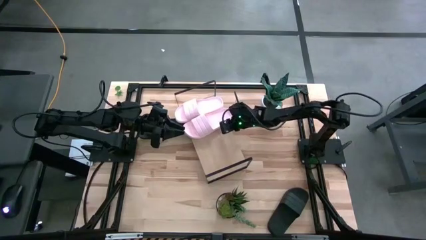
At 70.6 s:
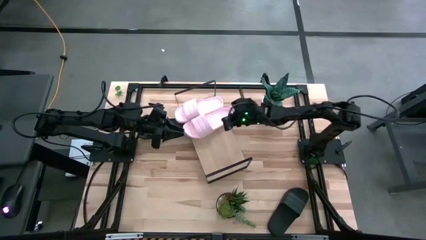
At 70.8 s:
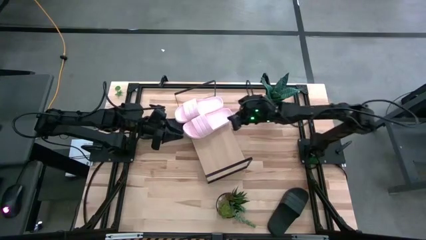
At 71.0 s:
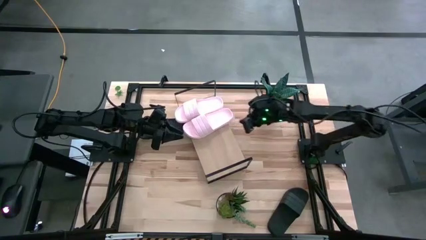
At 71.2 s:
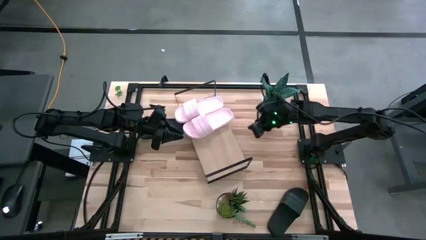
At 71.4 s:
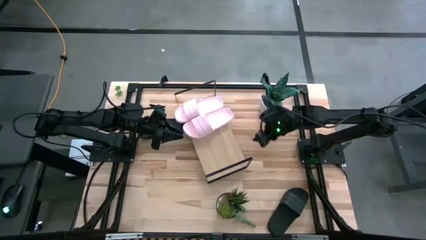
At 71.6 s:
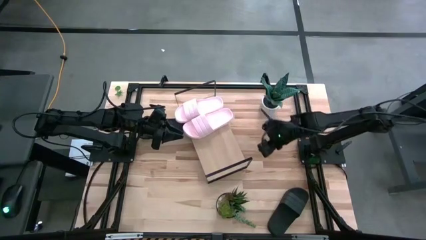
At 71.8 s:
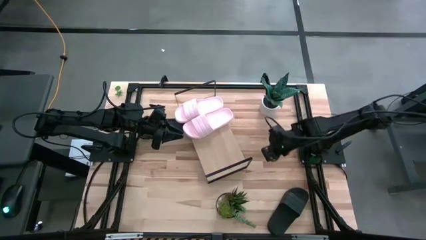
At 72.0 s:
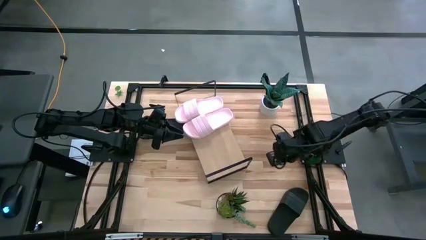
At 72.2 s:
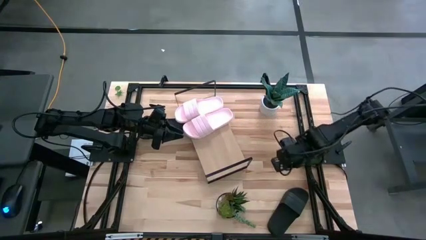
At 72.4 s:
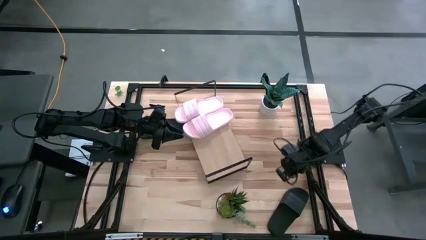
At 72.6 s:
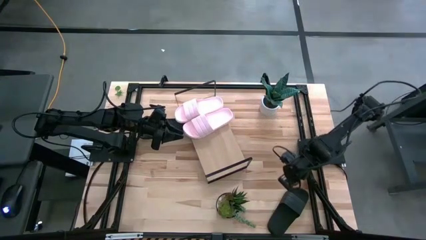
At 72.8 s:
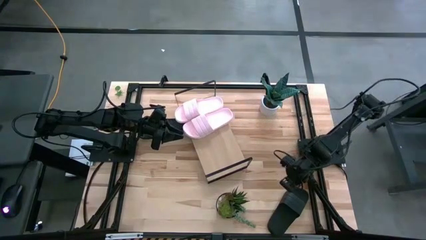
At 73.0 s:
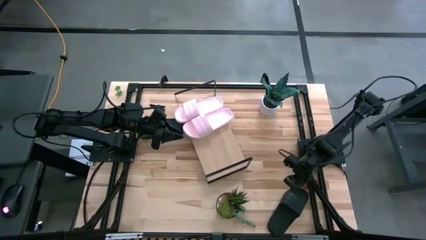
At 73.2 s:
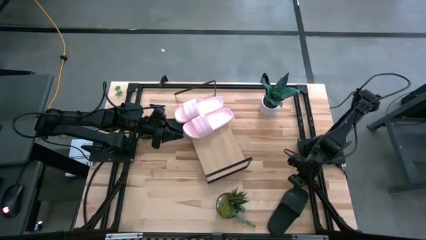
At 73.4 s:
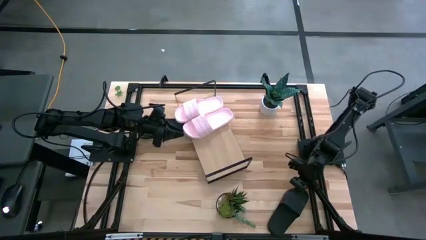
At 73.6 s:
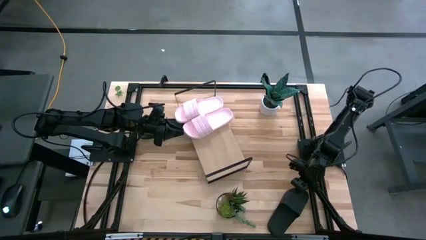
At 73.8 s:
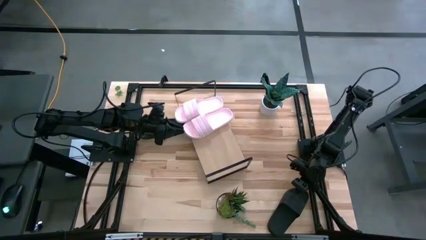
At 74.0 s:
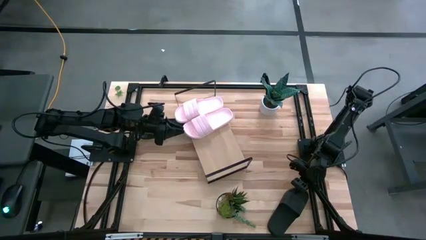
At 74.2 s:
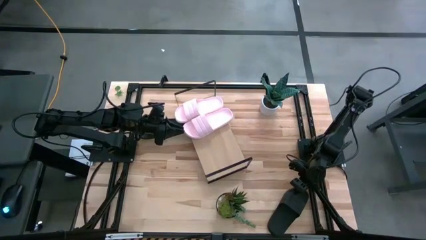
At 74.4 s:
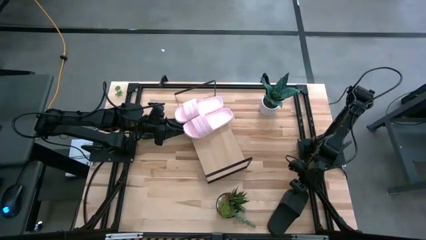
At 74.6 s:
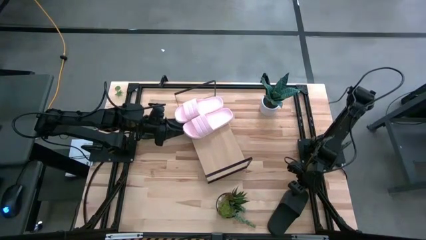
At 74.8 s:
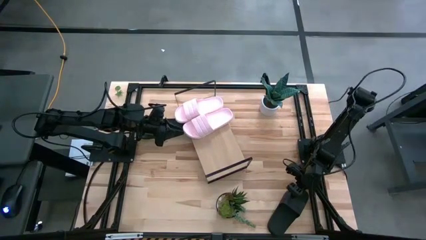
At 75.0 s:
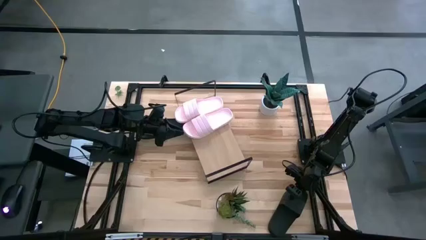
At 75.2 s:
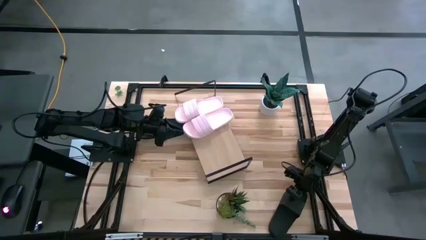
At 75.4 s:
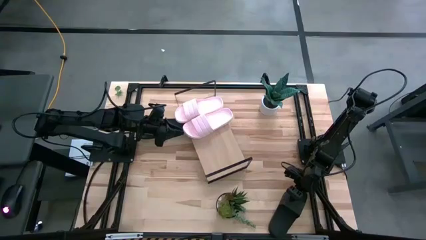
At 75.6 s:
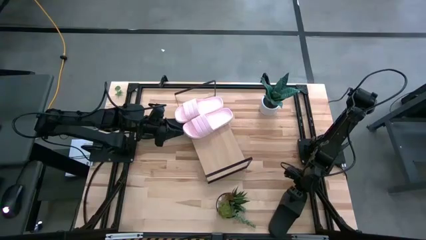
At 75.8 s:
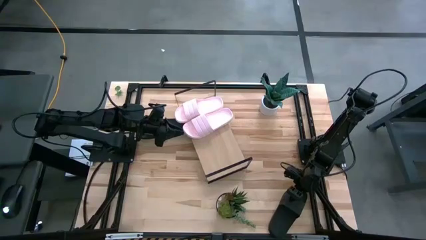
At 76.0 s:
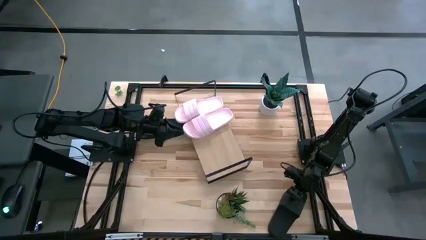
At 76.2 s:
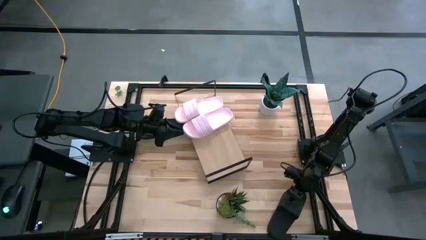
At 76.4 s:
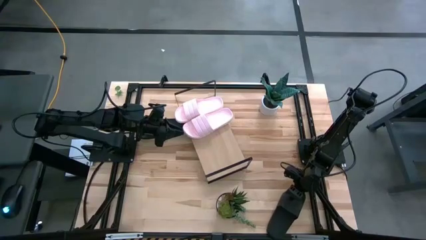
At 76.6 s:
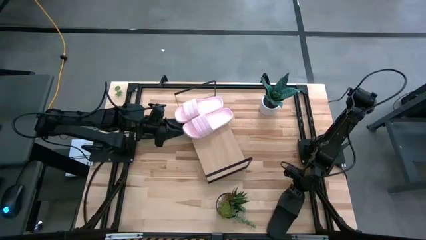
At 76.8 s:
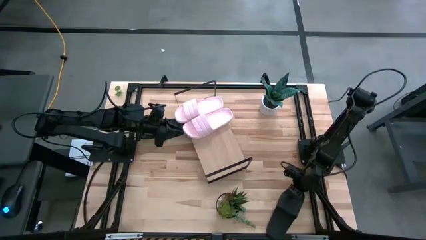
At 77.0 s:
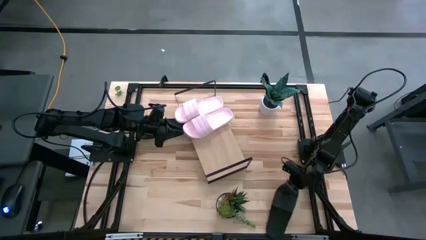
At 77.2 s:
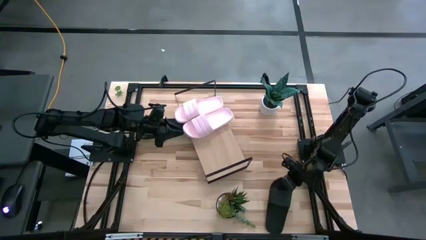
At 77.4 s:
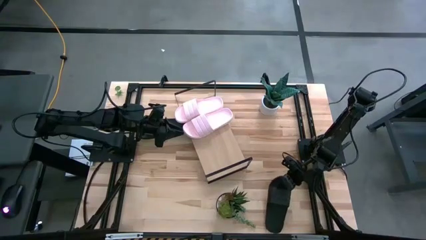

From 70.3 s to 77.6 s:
Task: Pick and place slides into the shelf
Put the right black slides on the shelf

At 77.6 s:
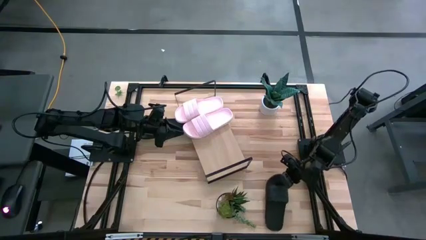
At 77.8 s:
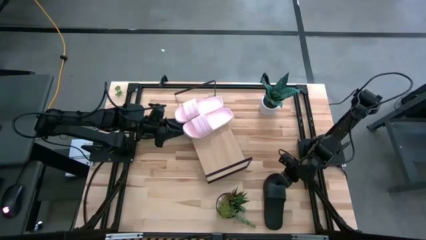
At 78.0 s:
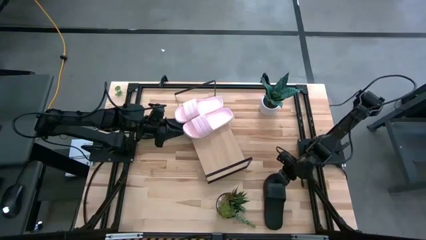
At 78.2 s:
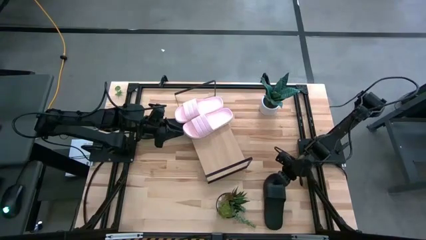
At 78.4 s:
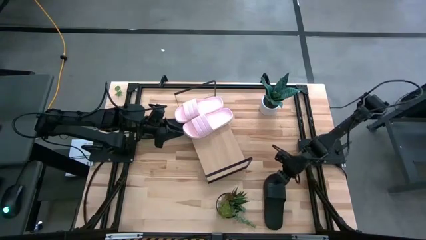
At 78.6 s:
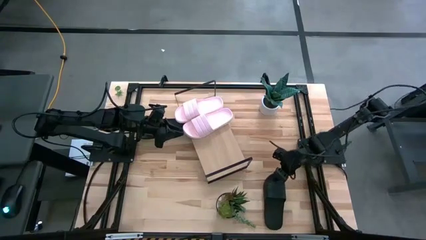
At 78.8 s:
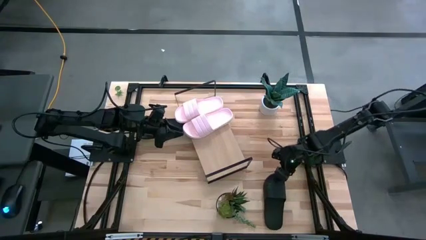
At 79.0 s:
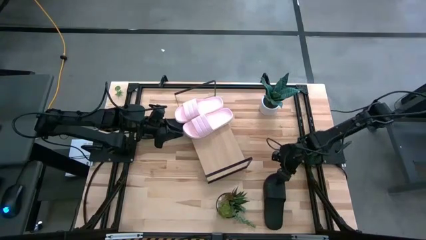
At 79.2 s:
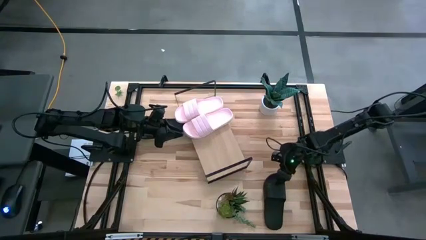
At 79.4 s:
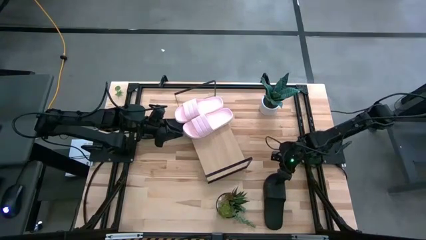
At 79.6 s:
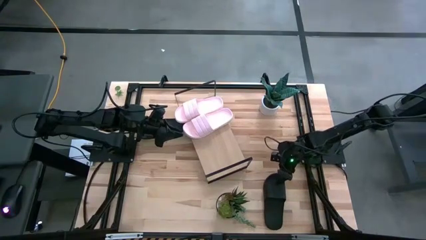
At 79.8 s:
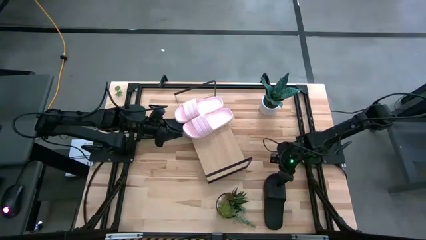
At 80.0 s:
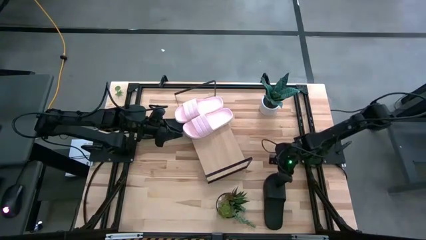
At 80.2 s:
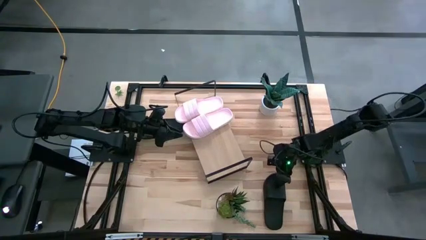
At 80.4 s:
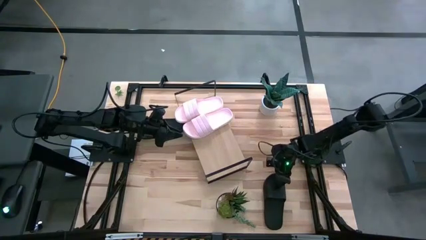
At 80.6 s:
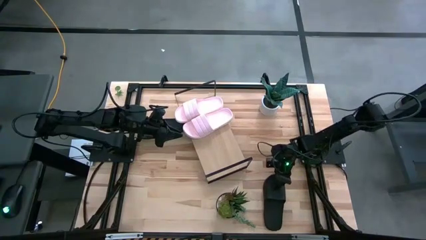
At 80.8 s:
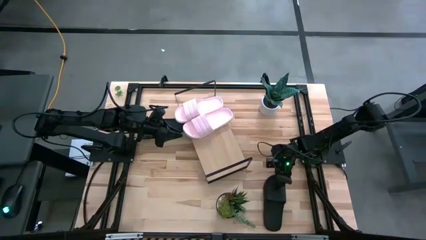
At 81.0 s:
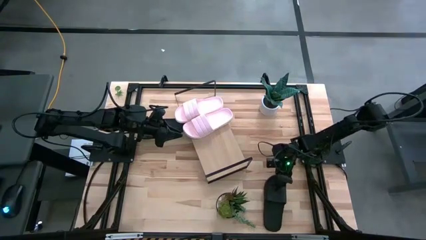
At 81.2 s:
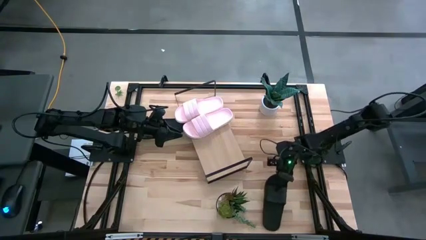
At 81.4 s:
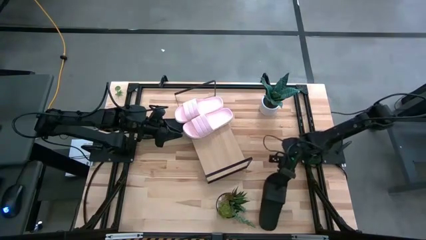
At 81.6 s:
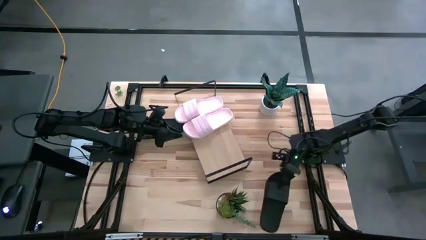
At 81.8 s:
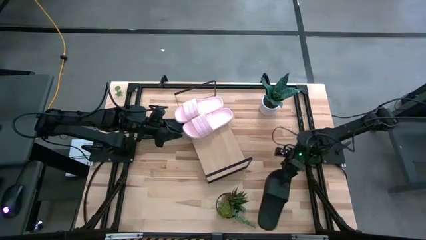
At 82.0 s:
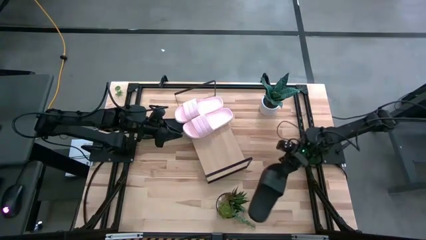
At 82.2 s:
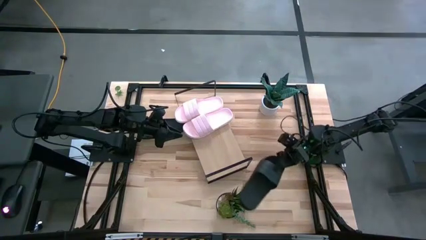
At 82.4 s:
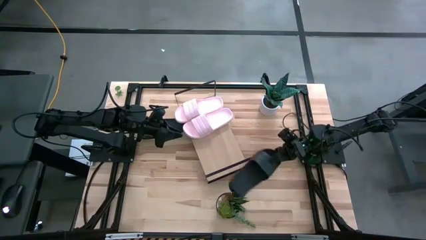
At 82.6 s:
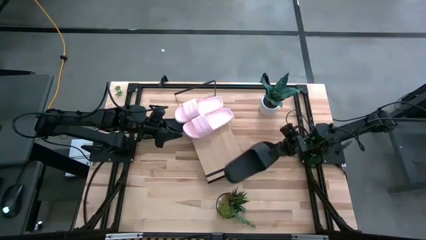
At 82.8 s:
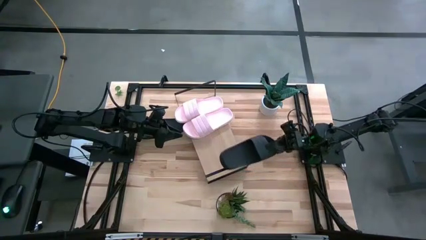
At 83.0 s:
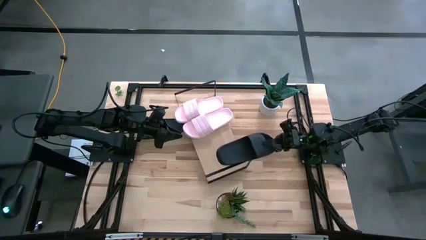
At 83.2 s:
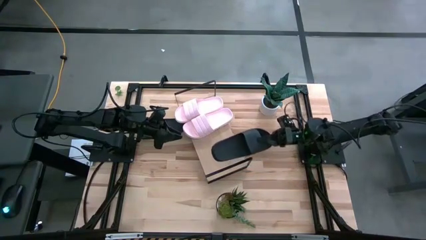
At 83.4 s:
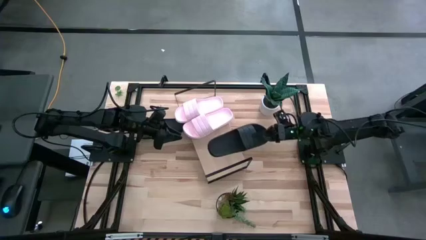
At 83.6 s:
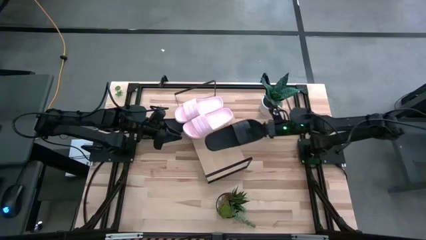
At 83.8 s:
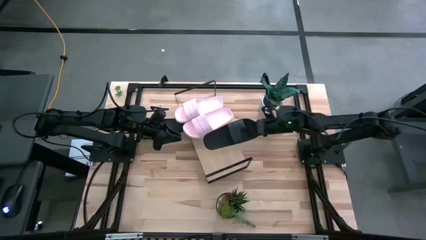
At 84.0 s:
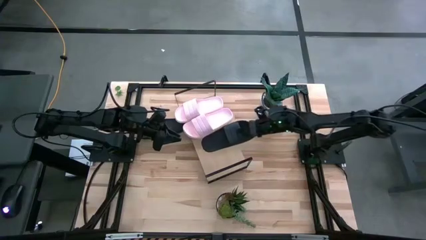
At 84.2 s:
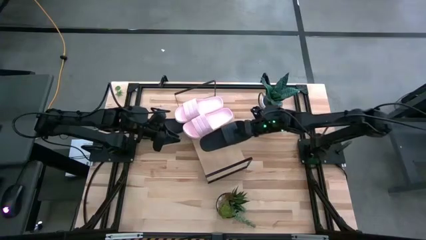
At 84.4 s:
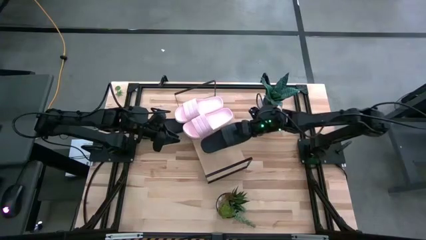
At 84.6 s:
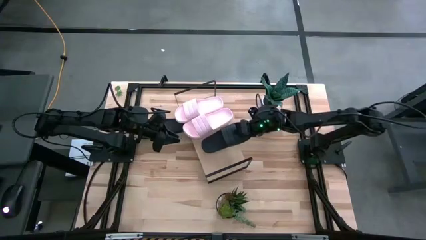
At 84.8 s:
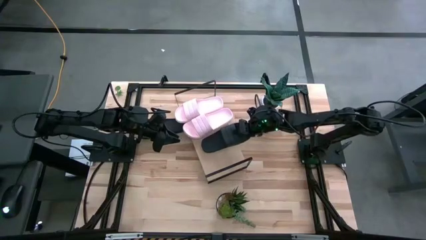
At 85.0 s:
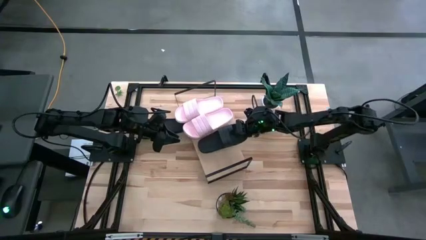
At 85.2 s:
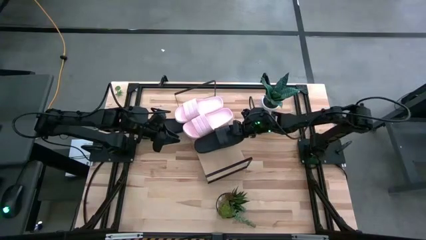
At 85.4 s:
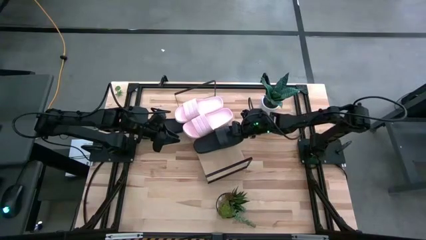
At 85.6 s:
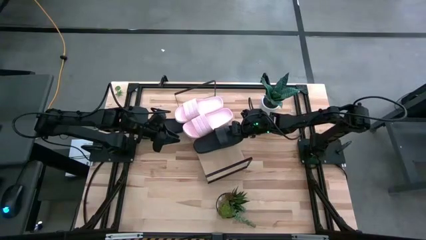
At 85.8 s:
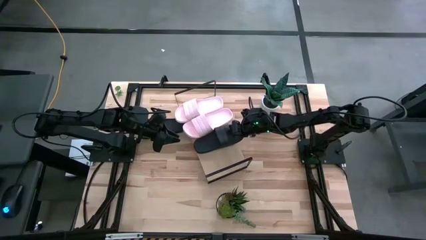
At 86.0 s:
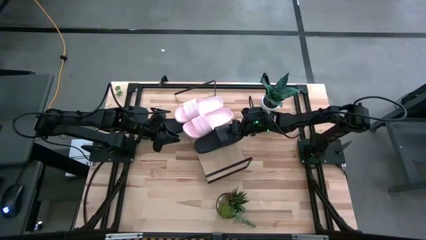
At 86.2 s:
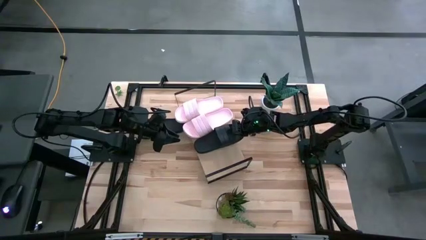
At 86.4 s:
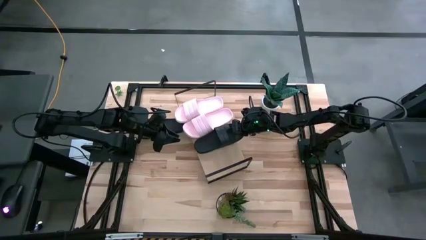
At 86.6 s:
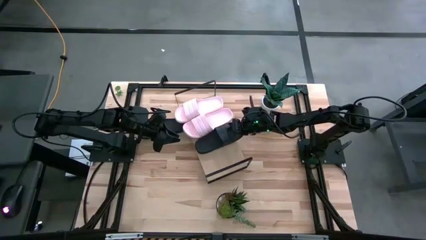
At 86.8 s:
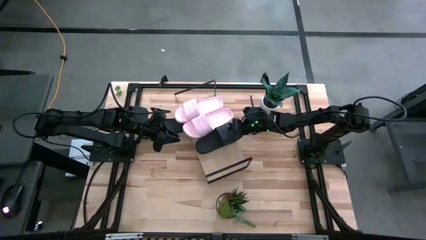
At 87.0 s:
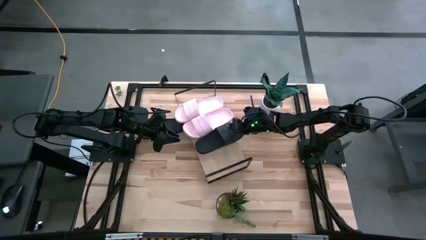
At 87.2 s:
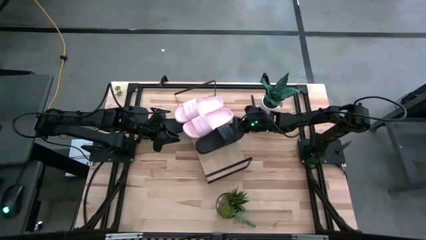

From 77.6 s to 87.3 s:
Put the right black slides on the shelf
